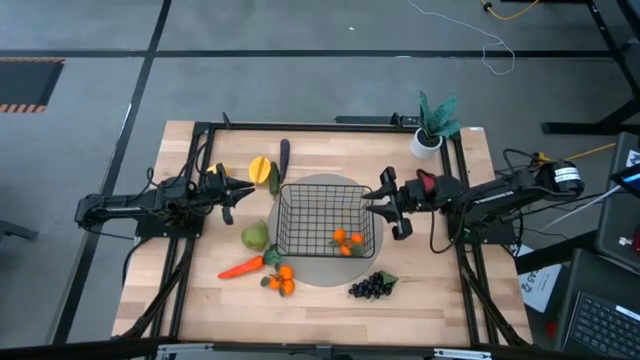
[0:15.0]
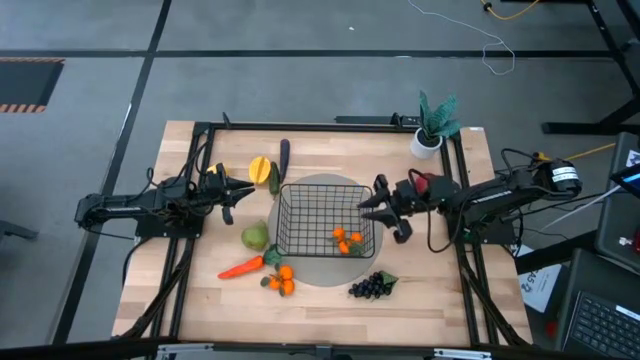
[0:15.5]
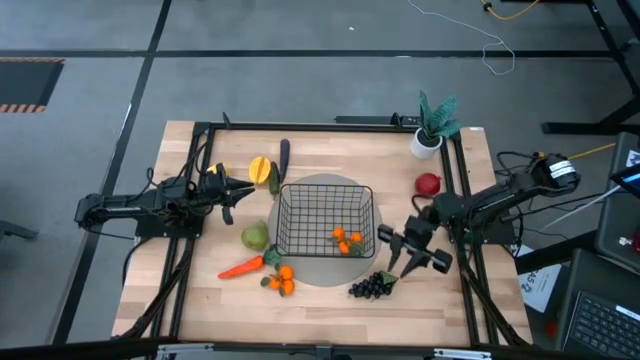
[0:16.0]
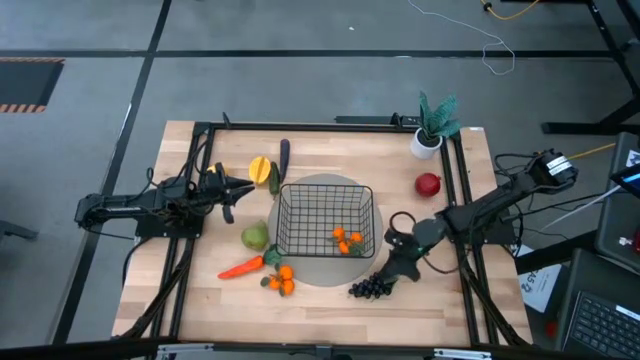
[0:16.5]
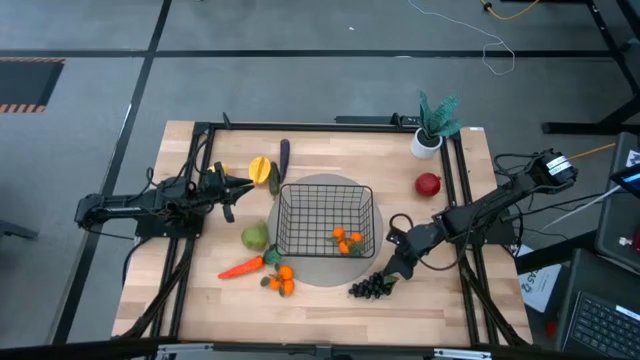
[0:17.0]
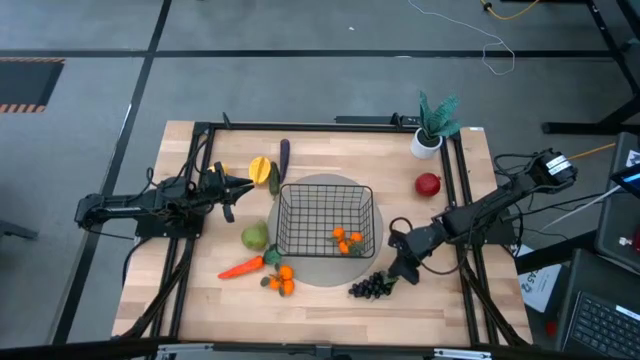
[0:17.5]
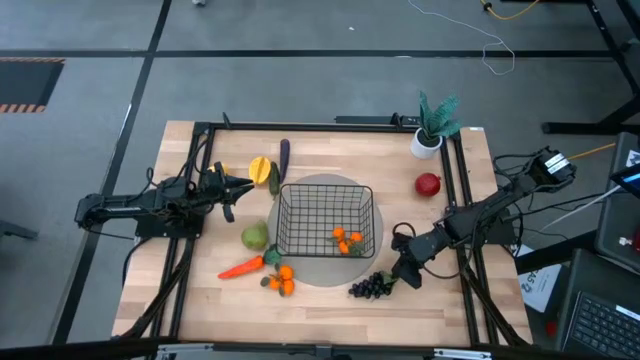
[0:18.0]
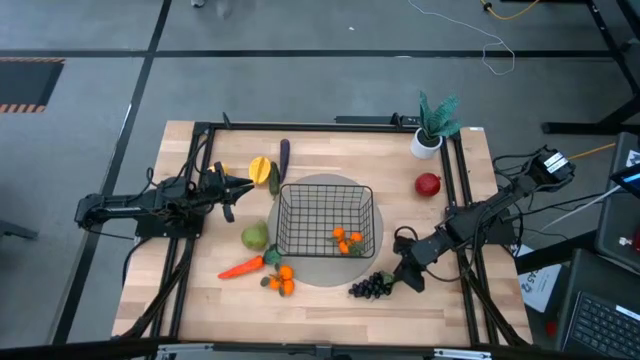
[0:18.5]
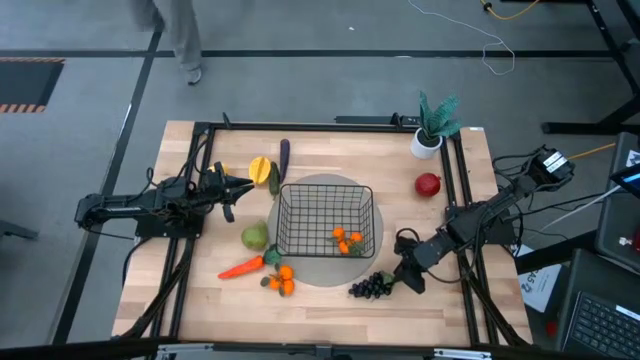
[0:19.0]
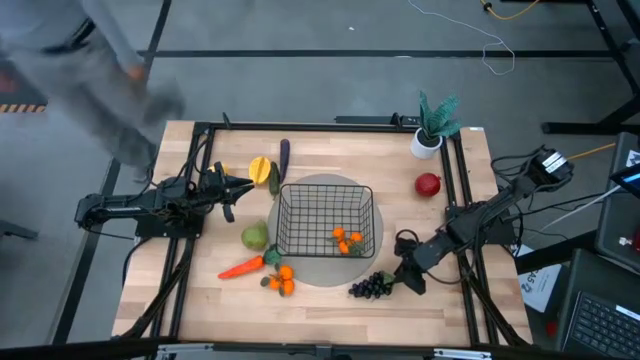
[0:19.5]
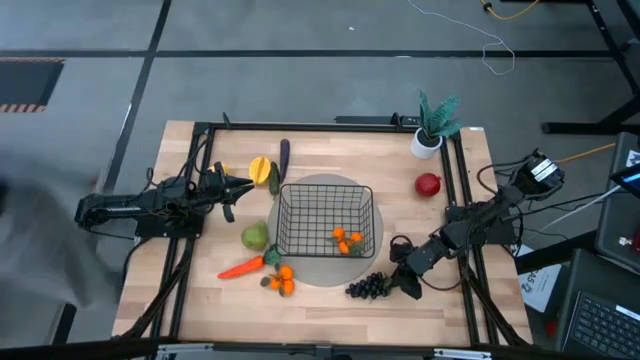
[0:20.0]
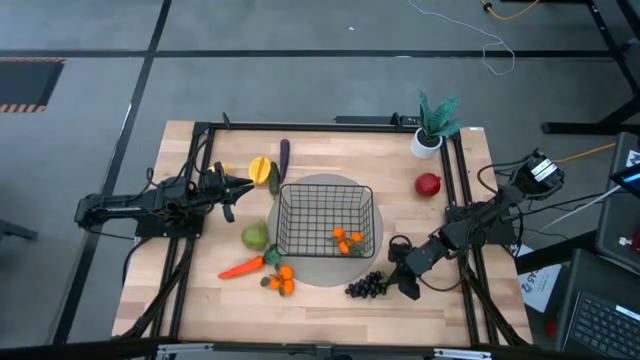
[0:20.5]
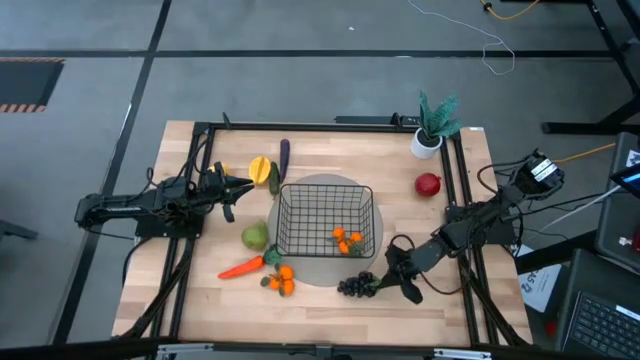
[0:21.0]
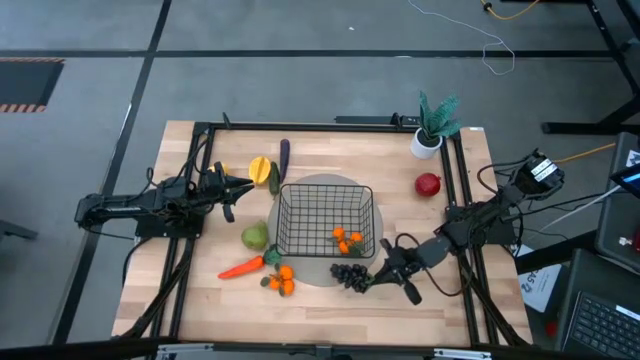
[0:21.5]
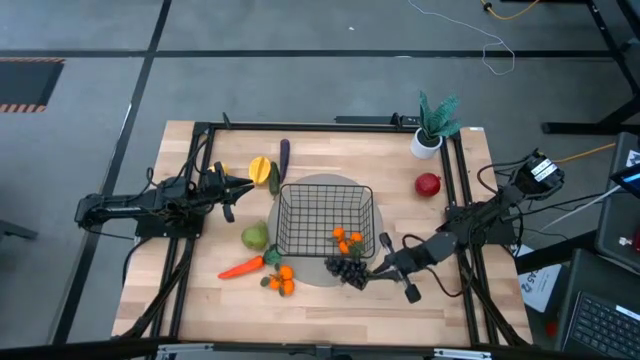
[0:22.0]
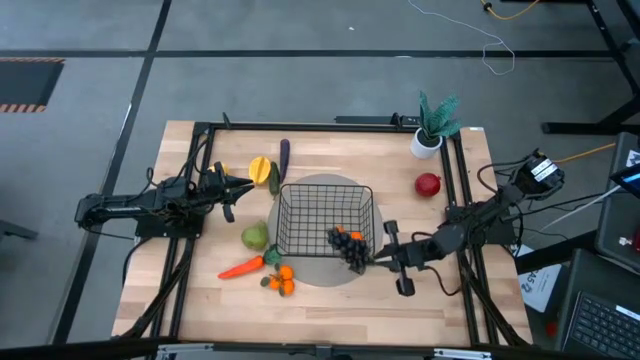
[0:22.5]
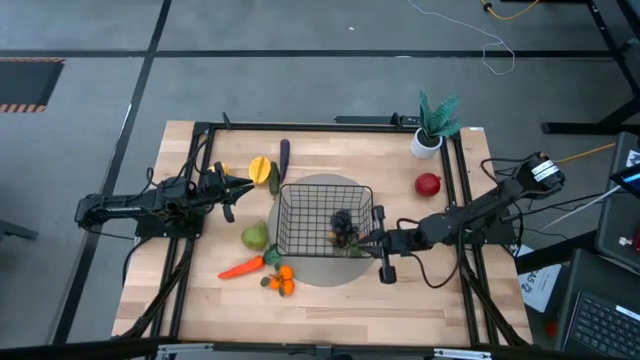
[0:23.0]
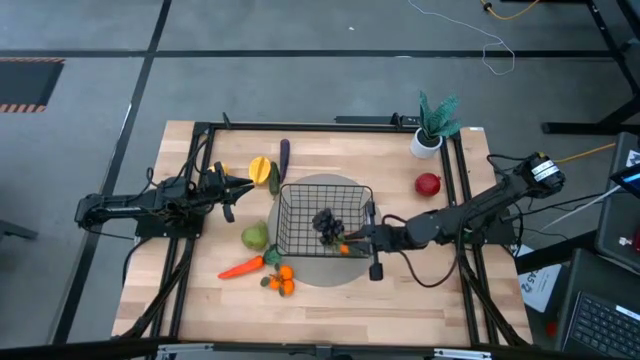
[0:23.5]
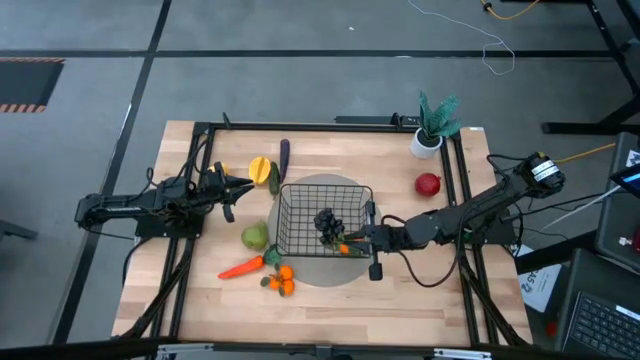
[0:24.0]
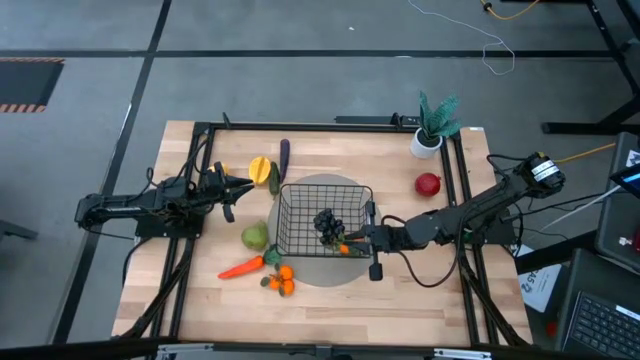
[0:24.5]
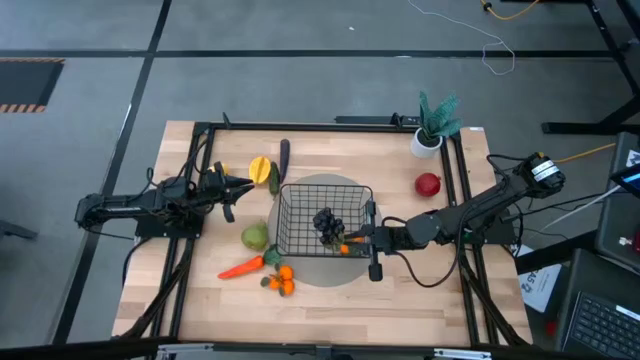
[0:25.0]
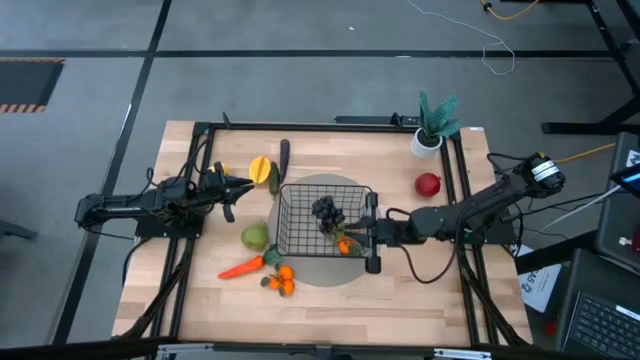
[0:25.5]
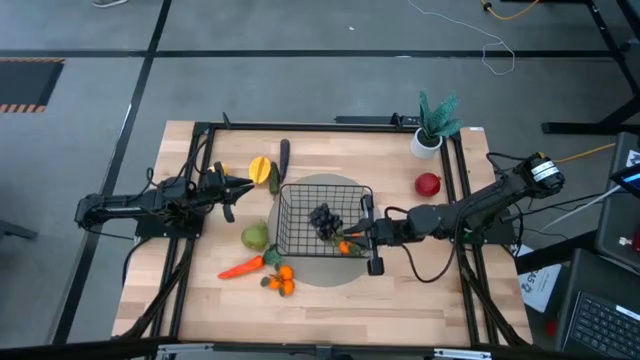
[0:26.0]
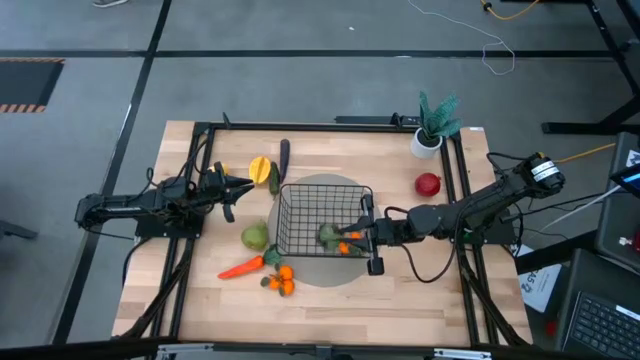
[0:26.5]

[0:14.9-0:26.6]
Task: Build produce basket
Put the dark purple grapes into the black wire basket

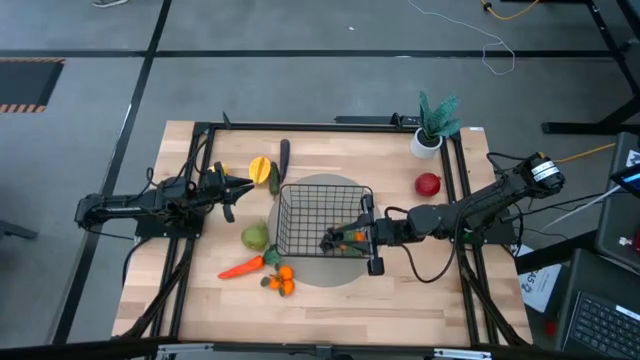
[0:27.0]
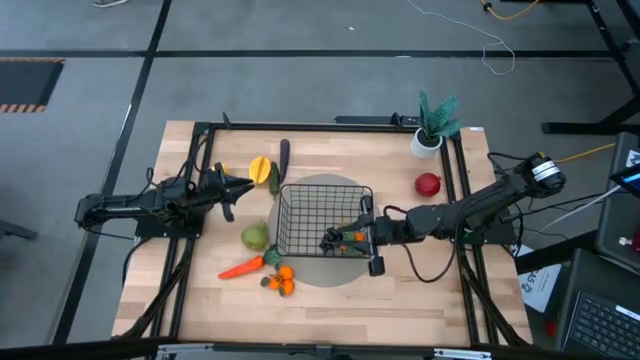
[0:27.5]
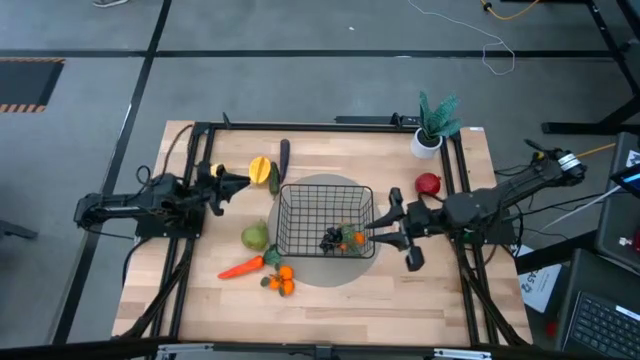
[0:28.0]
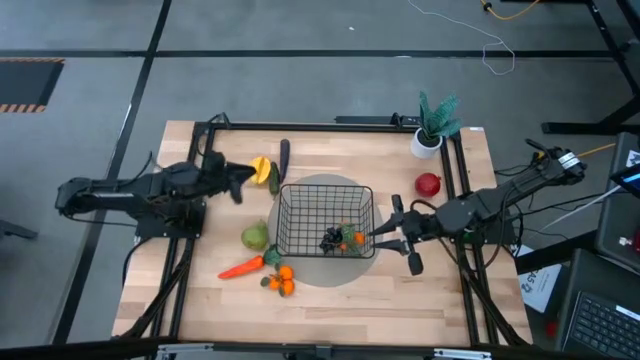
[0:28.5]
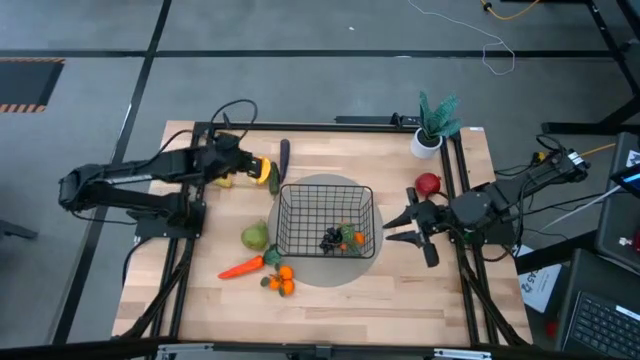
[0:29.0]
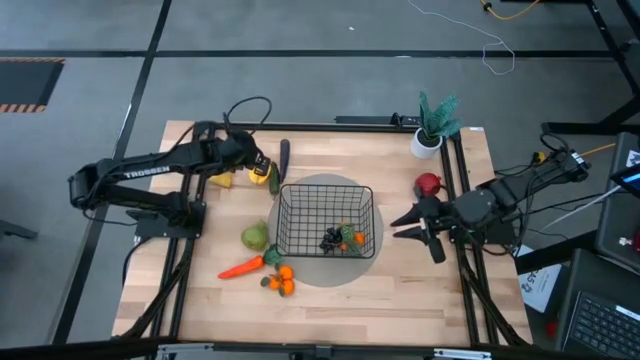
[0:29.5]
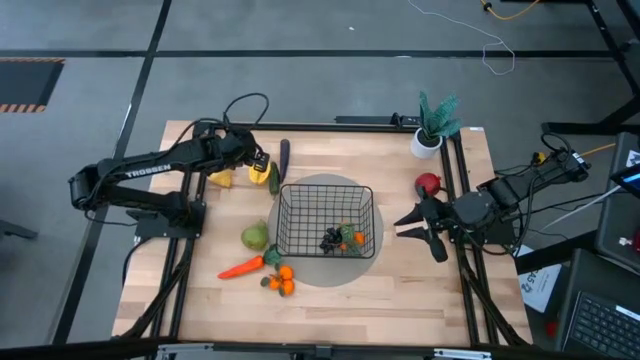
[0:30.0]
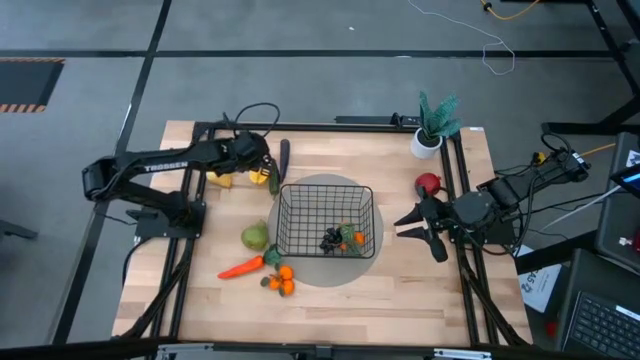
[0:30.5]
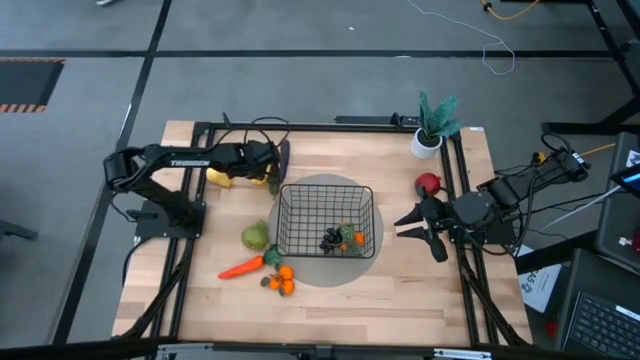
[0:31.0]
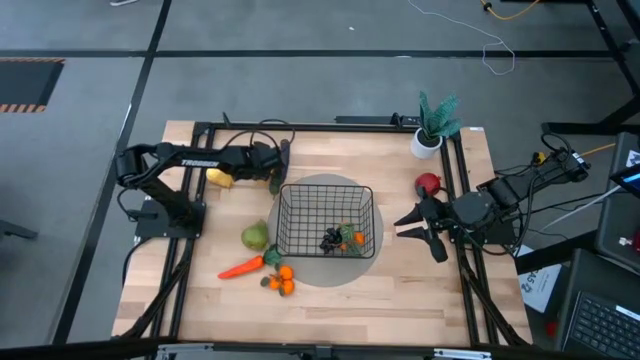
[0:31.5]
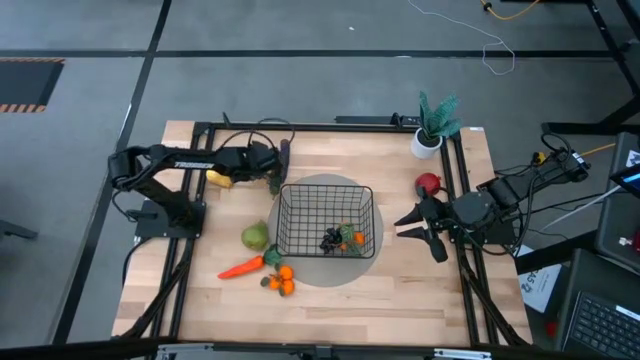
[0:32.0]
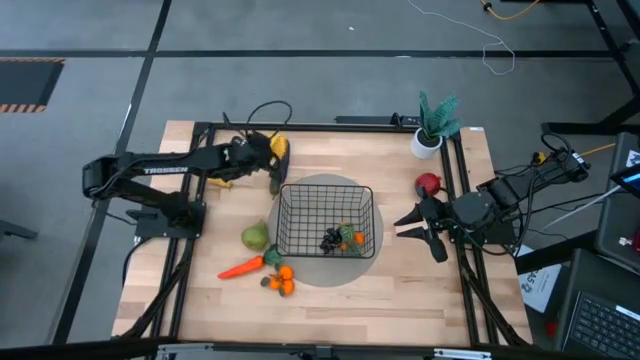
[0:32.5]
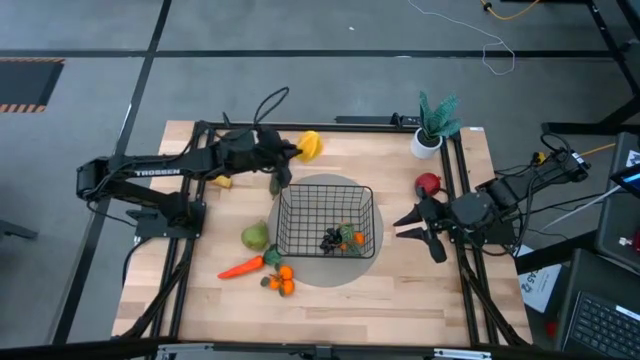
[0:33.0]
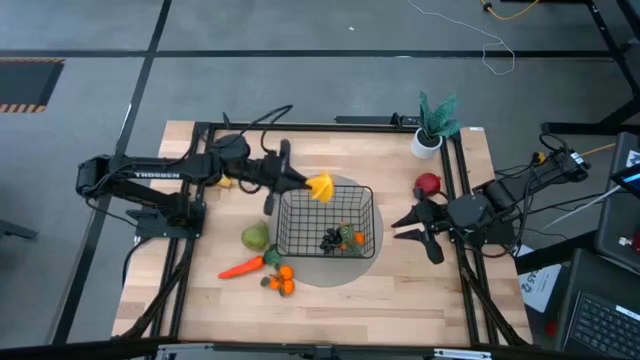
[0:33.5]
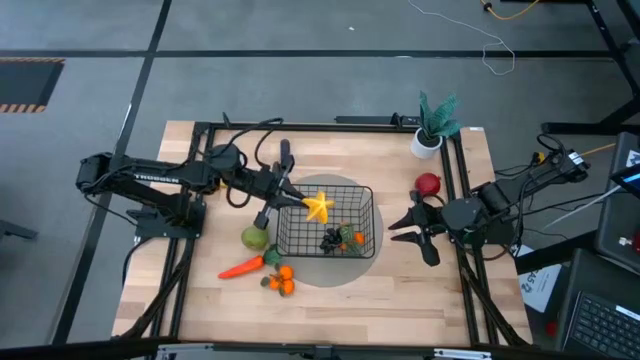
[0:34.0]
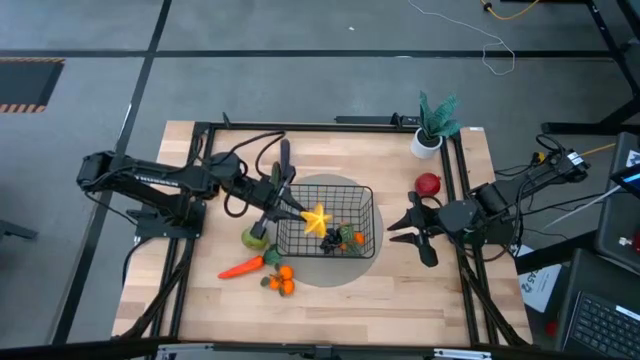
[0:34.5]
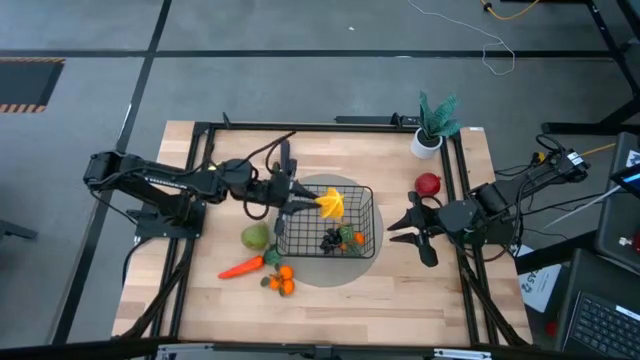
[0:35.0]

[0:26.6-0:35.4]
Put the yellow starfruit into the black wire basket
